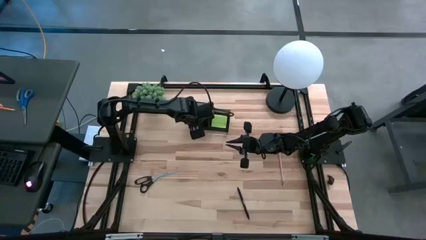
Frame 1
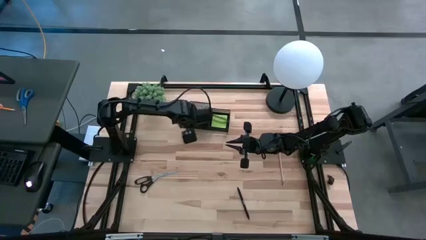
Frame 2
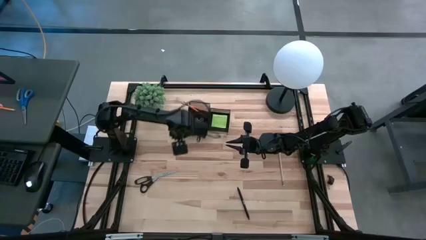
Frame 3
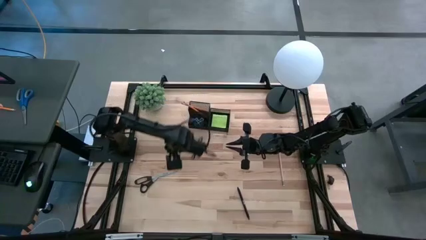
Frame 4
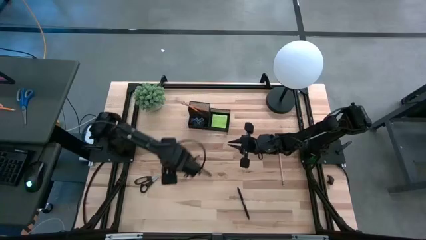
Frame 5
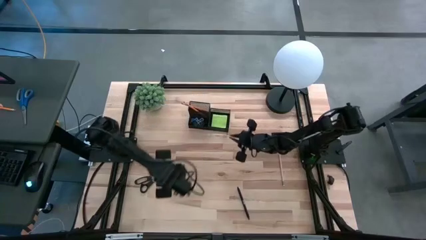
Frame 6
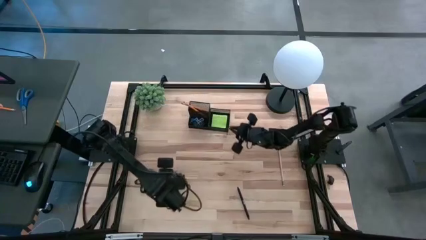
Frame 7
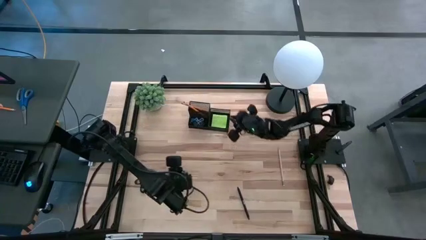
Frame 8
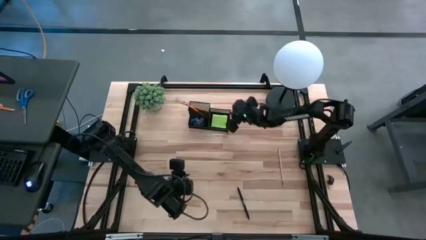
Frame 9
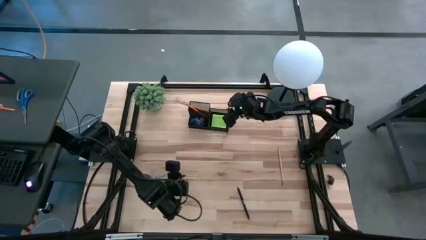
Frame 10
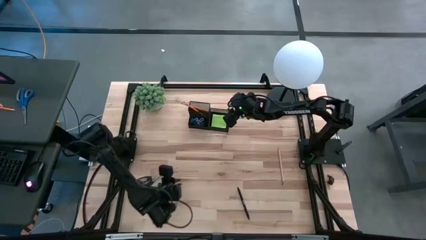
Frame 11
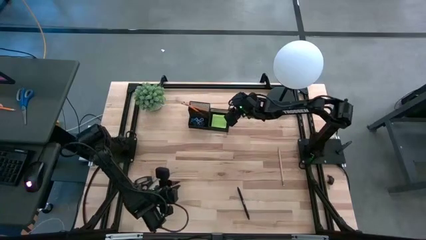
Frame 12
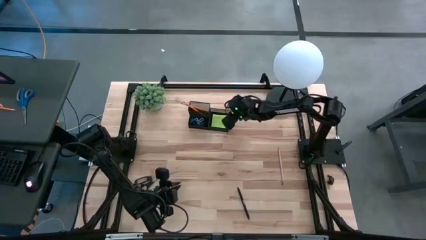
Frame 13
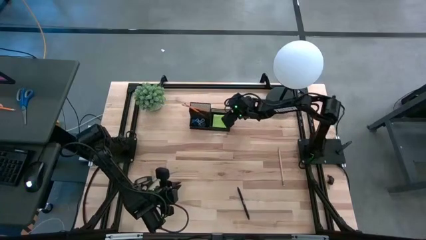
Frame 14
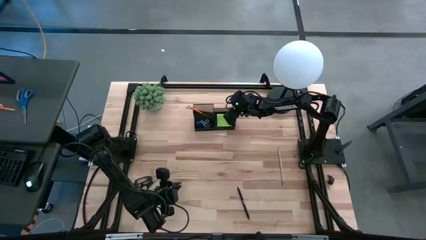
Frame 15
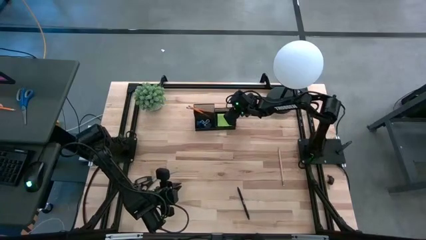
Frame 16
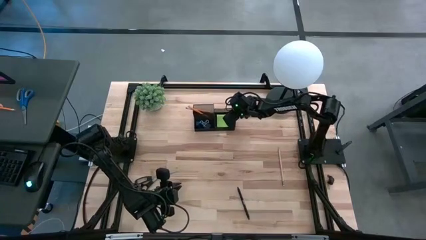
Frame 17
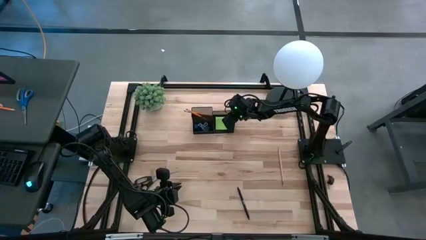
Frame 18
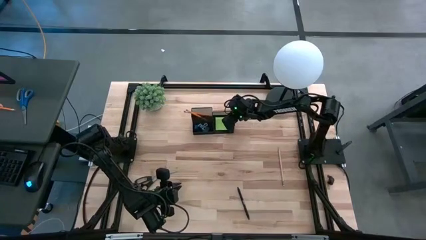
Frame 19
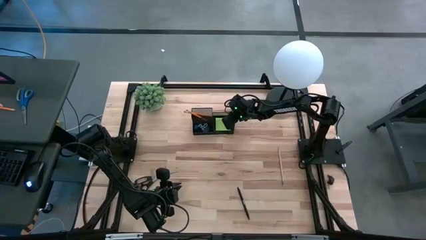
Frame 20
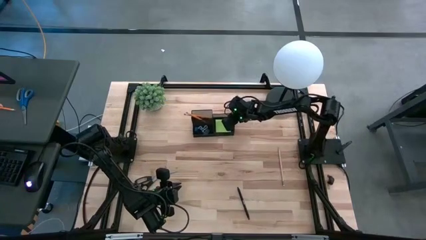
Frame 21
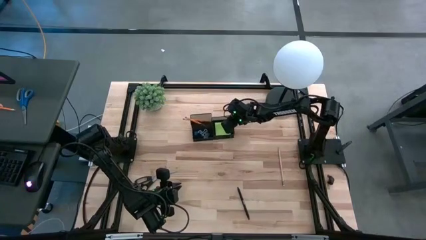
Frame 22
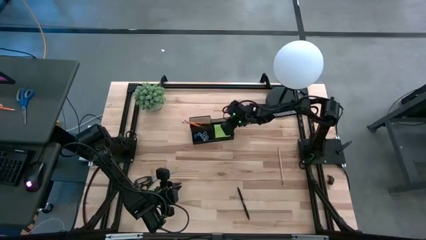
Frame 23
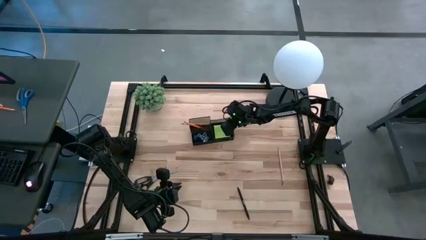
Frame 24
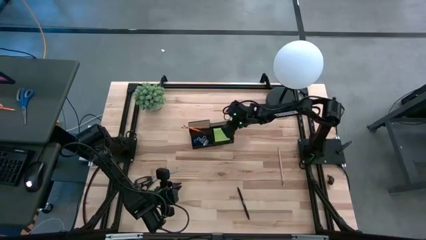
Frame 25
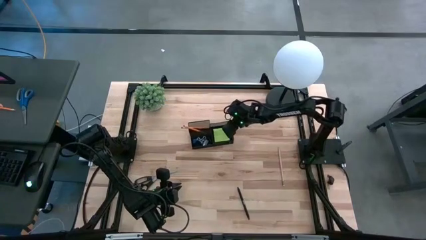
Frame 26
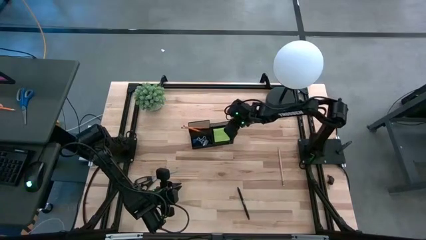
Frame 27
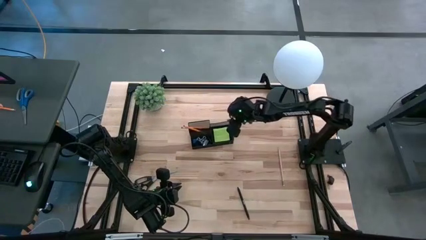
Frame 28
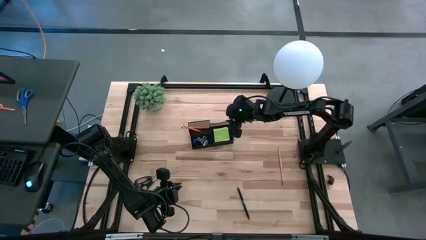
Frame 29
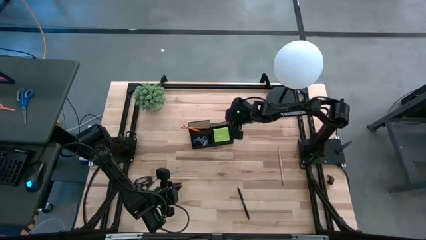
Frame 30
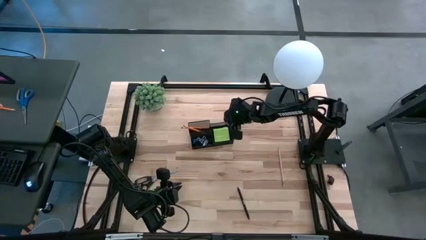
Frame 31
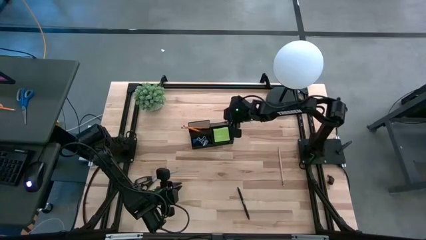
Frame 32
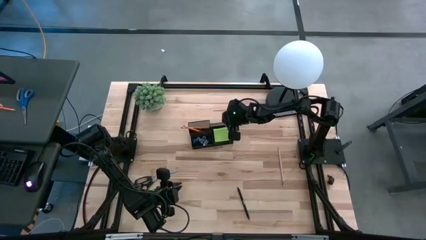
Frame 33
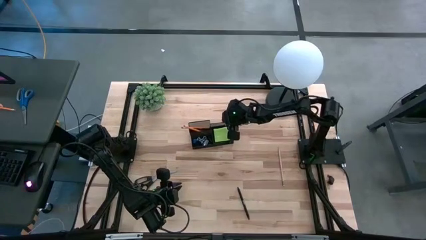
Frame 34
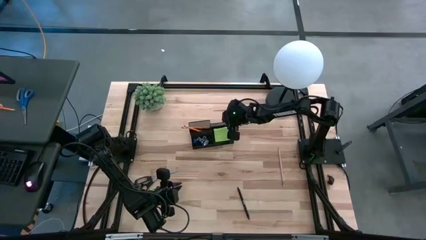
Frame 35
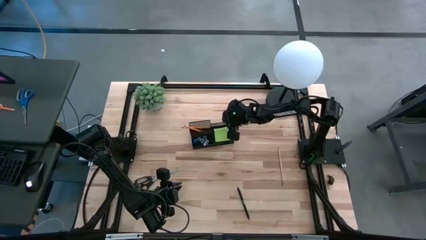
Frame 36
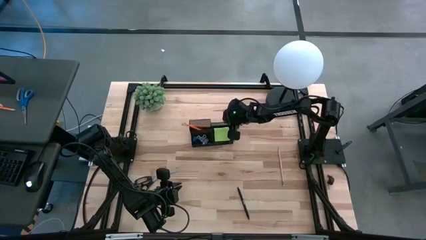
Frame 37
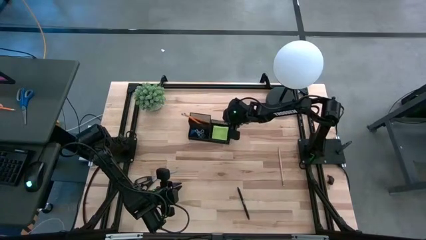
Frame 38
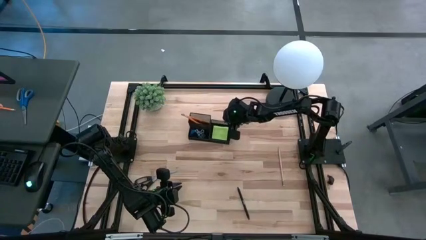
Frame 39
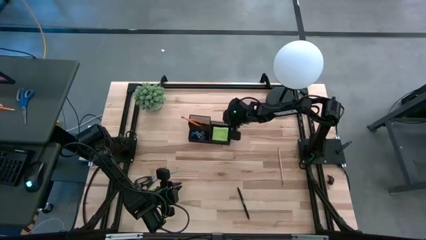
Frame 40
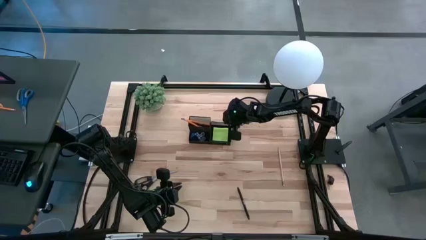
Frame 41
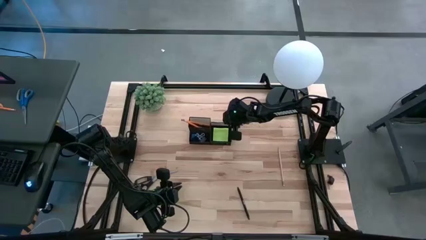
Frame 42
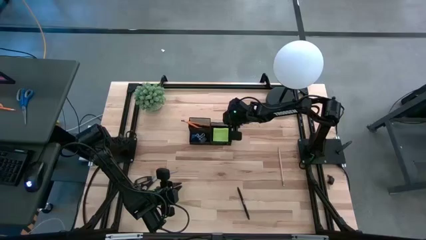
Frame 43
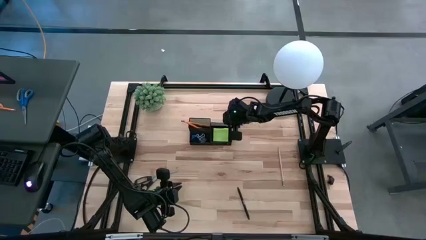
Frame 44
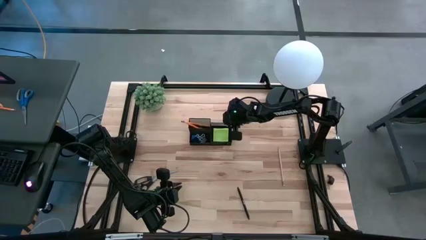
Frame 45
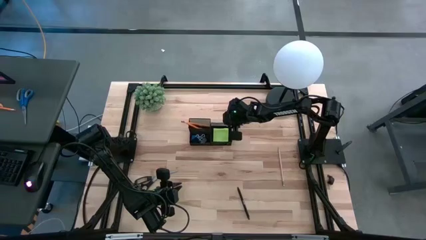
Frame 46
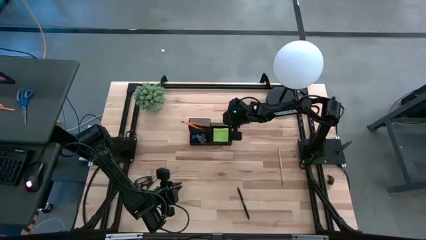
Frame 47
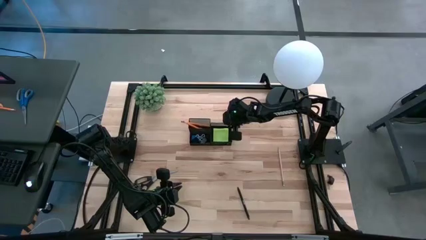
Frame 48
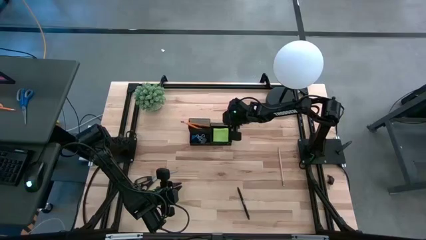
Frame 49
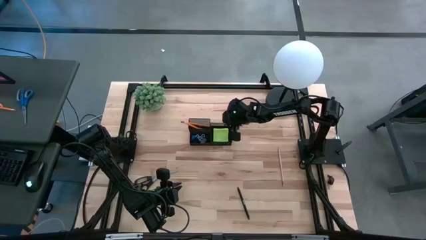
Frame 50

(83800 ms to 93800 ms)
Task: Pick and place office supplies into organizer
Move the organizer bin to the center

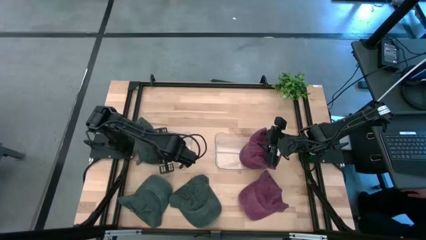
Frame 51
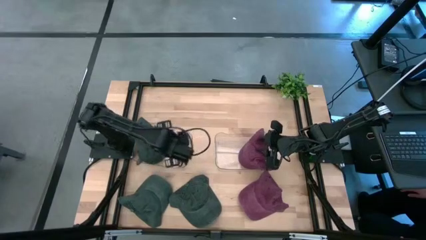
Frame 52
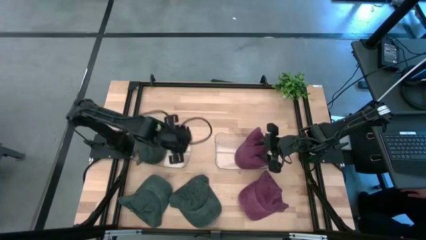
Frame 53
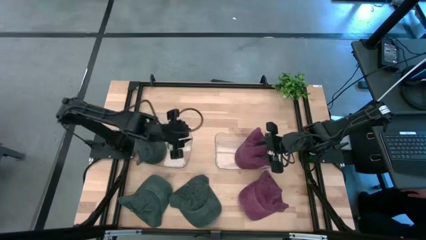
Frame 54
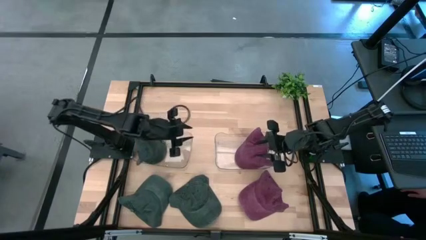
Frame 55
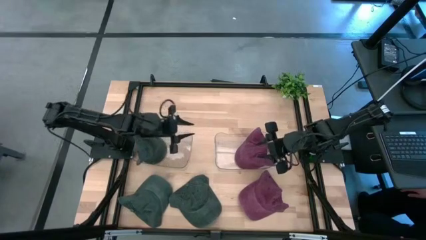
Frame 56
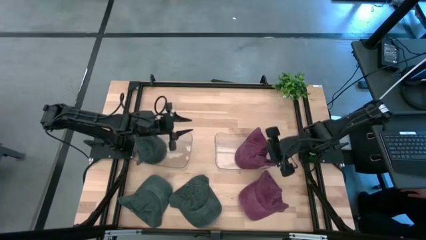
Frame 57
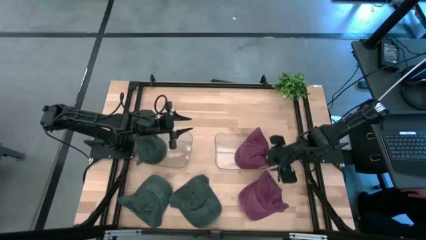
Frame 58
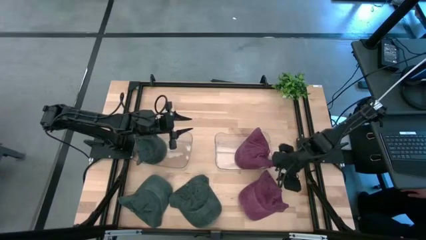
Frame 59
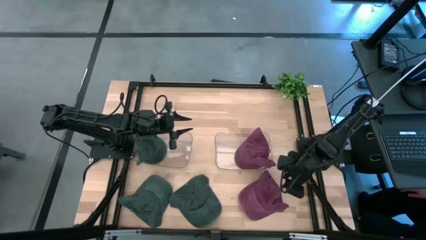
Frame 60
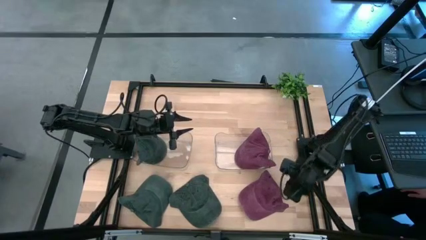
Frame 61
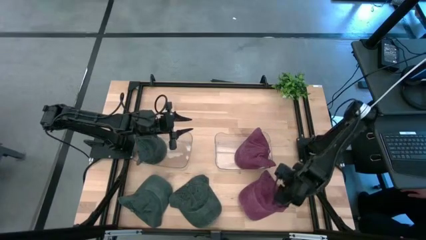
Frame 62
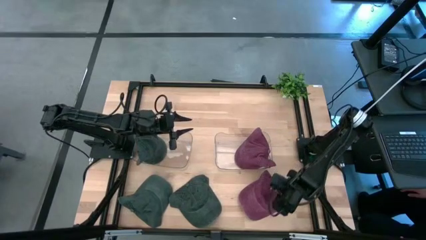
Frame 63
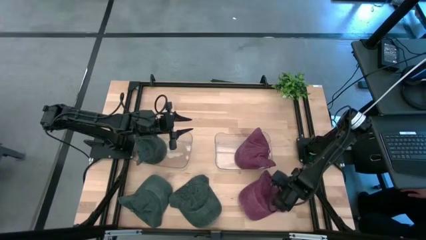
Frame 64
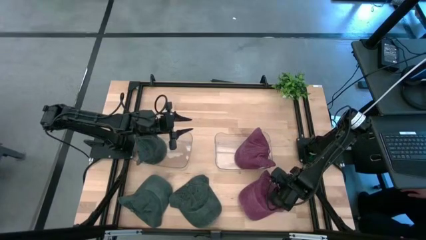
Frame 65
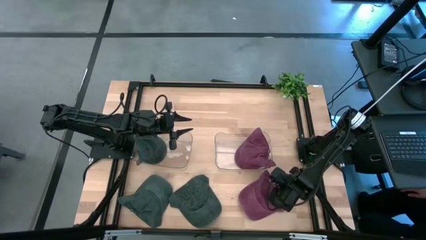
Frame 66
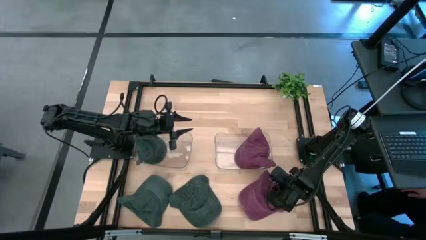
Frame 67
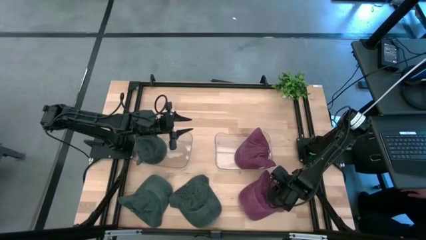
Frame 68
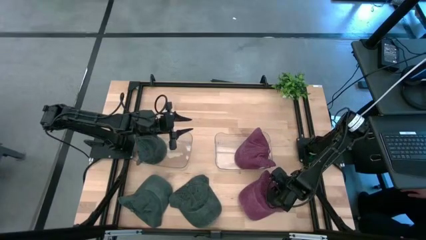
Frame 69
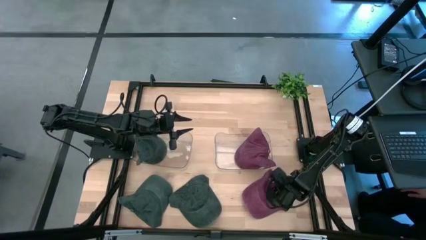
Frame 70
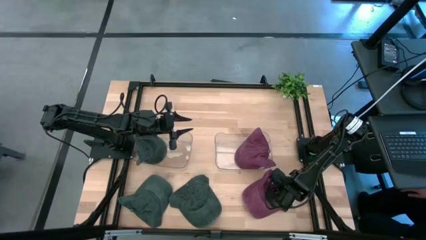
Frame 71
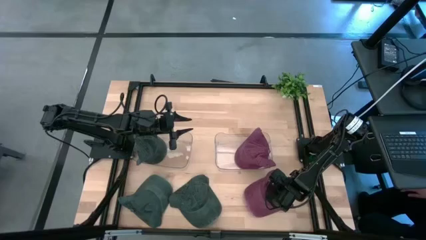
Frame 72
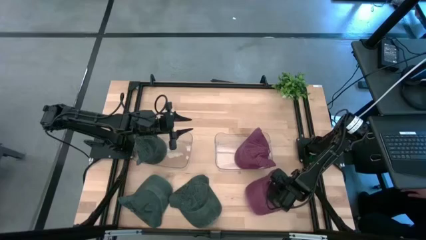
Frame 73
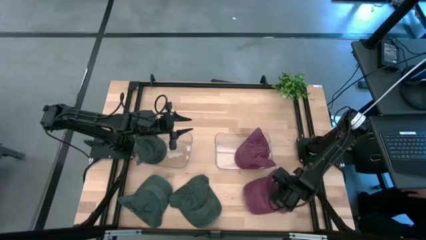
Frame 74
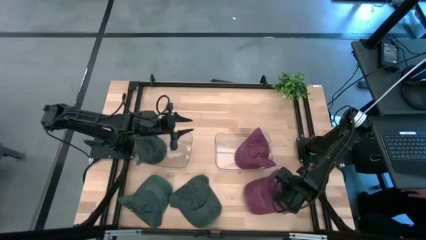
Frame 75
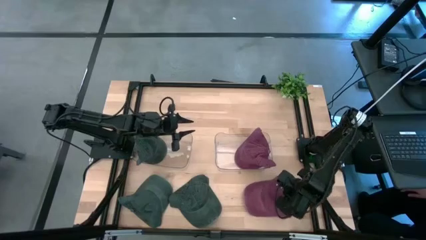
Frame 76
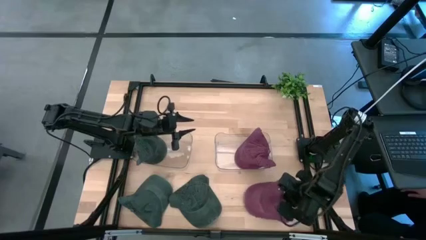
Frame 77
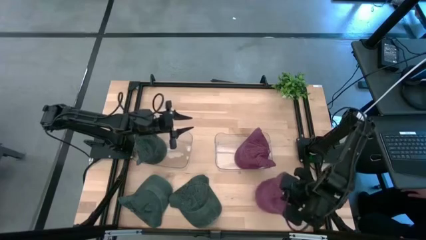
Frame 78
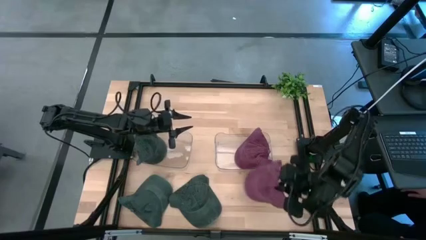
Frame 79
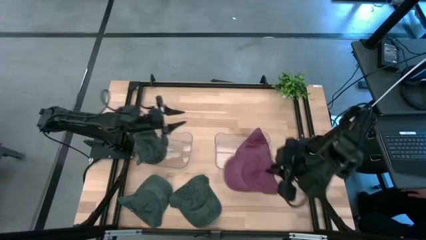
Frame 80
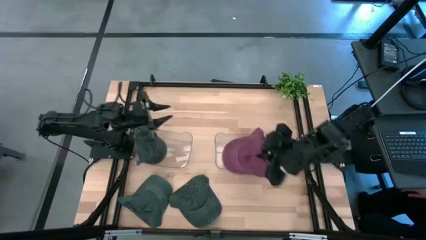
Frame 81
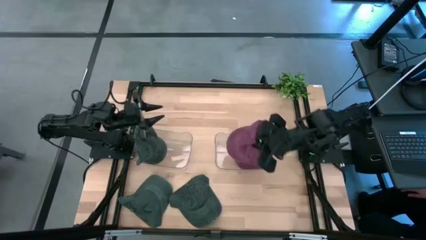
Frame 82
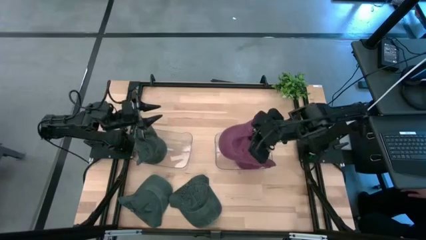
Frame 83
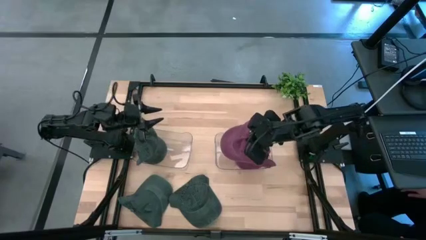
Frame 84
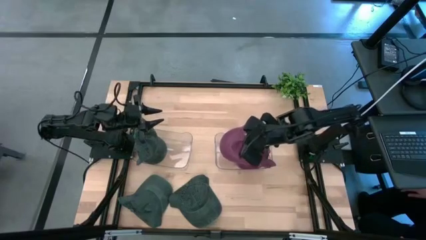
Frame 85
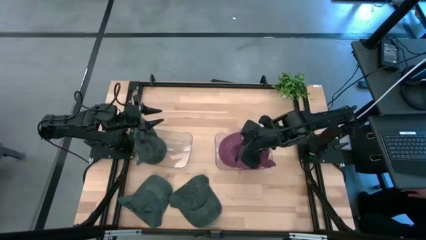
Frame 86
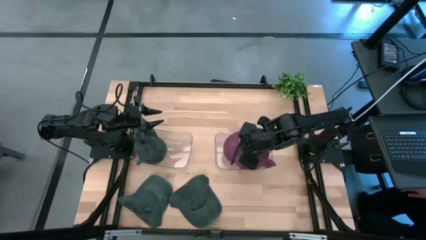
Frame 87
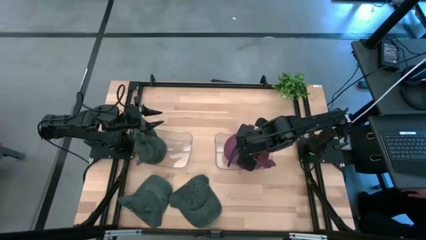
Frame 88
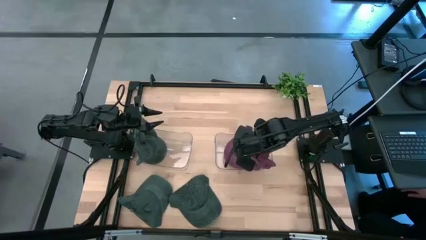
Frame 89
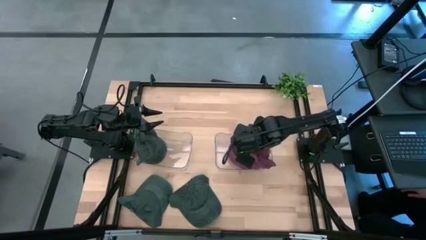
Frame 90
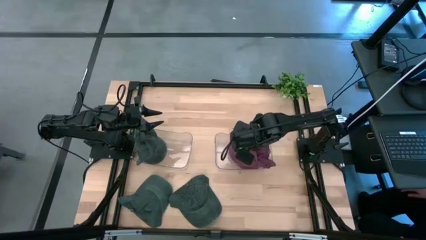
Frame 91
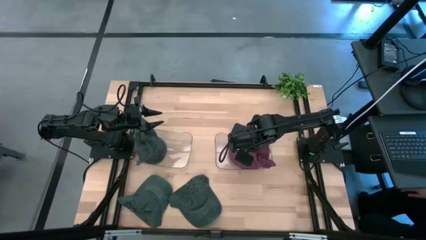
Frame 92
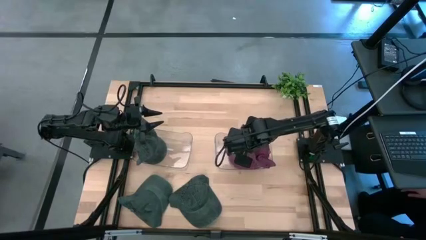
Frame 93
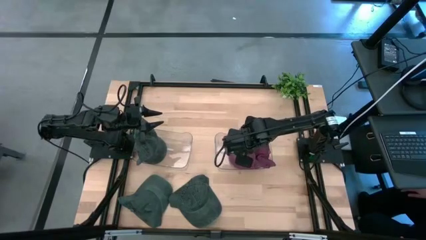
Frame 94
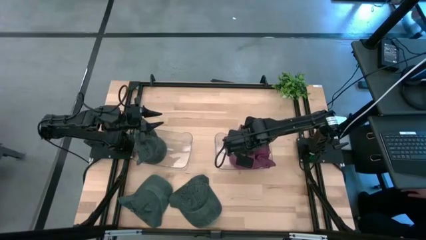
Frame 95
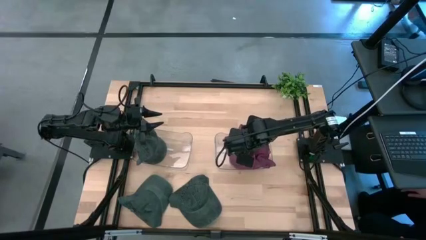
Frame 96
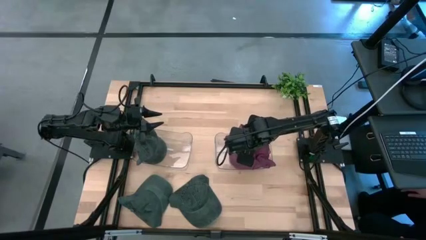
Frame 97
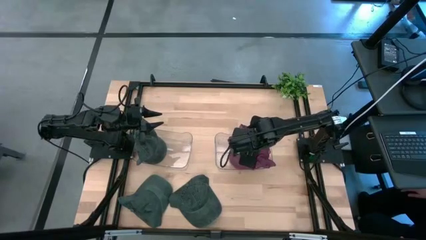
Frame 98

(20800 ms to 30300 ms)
Task: Pick & Place hat
Put the red cap into the right transparent bin
